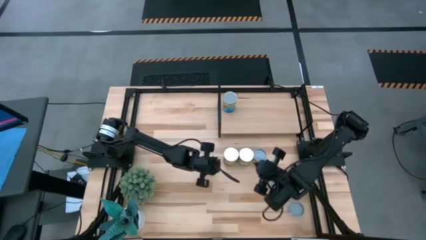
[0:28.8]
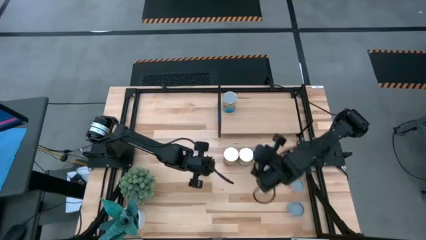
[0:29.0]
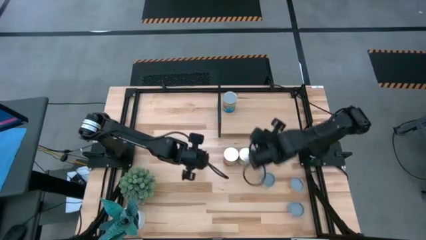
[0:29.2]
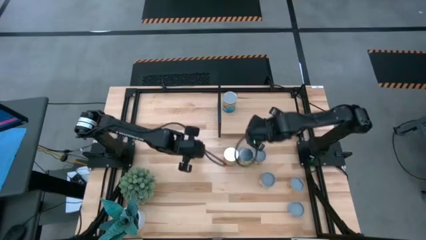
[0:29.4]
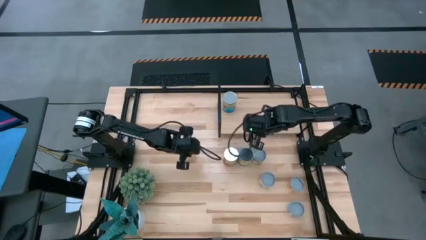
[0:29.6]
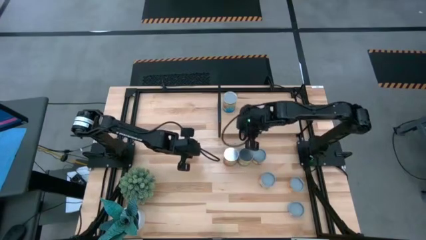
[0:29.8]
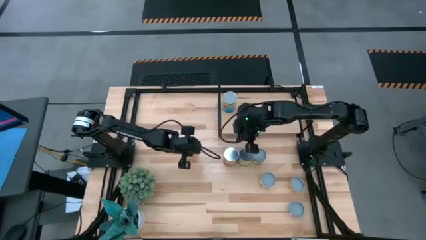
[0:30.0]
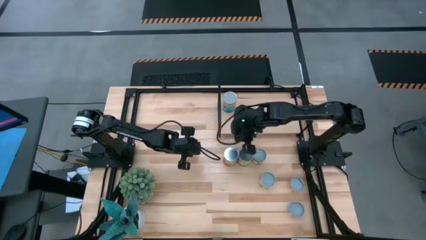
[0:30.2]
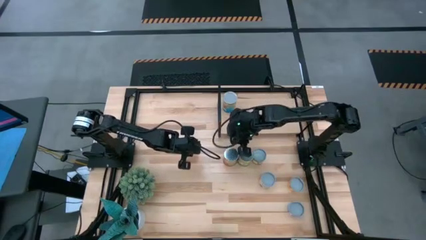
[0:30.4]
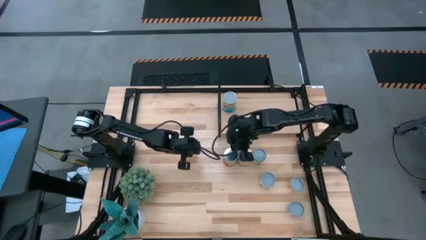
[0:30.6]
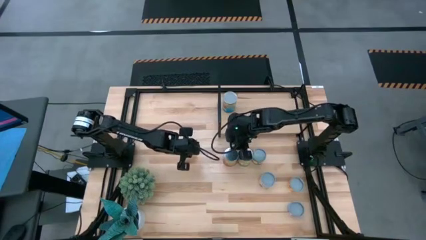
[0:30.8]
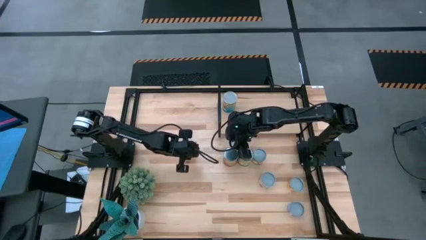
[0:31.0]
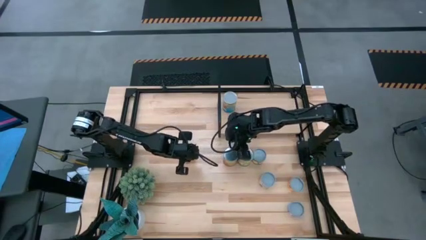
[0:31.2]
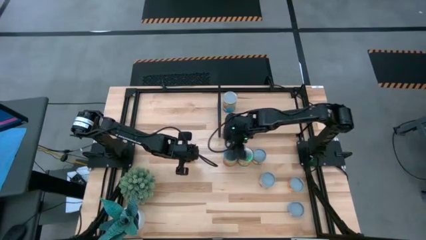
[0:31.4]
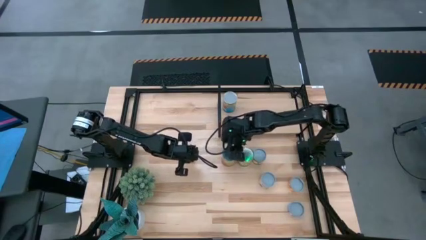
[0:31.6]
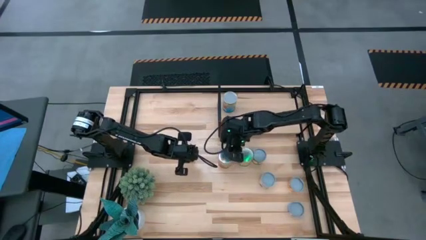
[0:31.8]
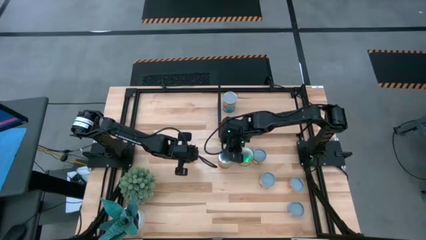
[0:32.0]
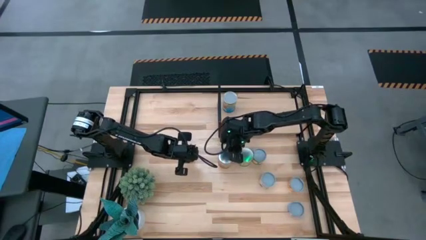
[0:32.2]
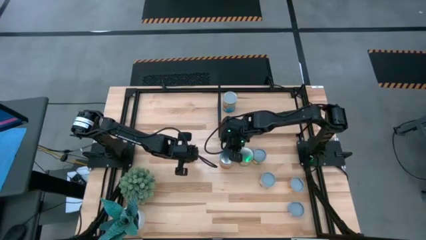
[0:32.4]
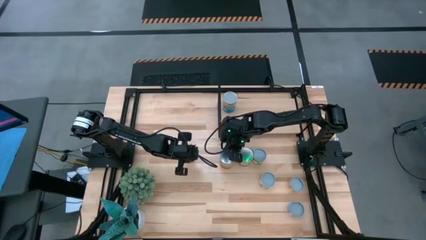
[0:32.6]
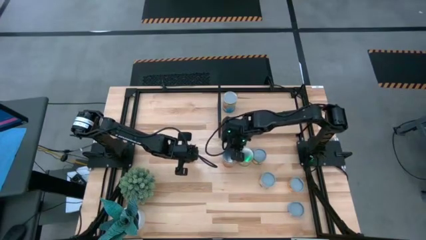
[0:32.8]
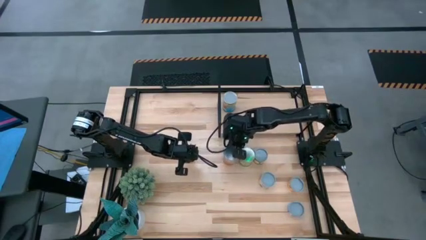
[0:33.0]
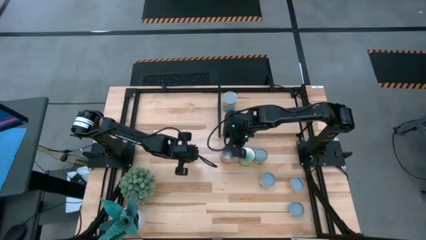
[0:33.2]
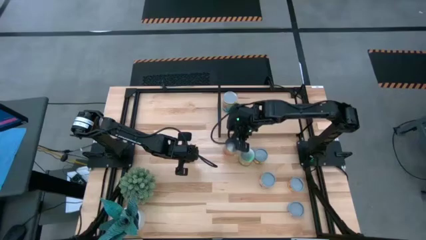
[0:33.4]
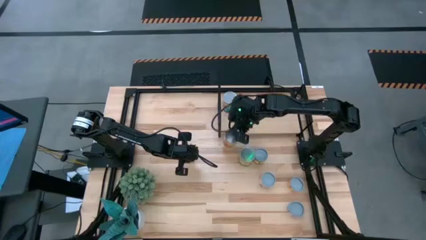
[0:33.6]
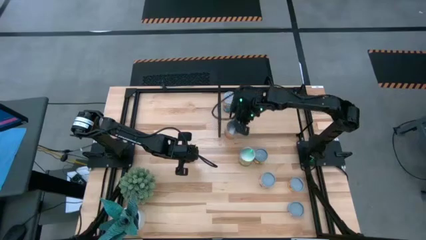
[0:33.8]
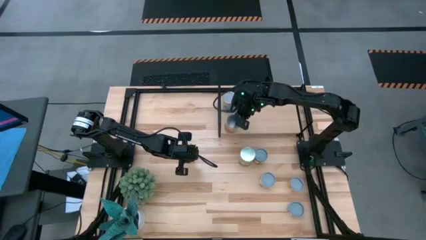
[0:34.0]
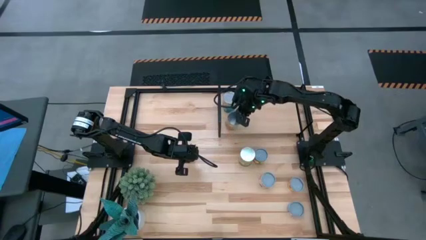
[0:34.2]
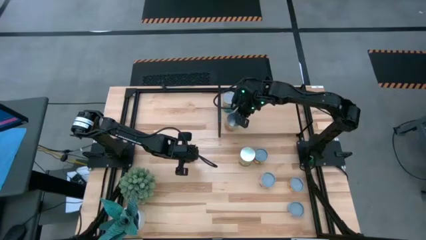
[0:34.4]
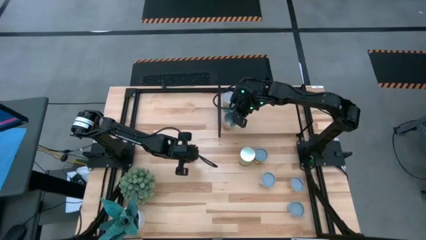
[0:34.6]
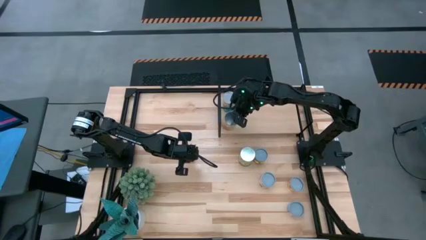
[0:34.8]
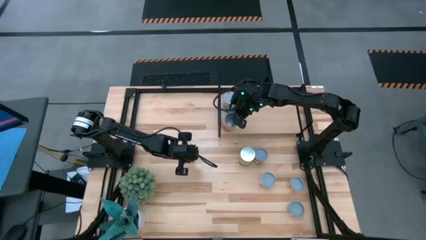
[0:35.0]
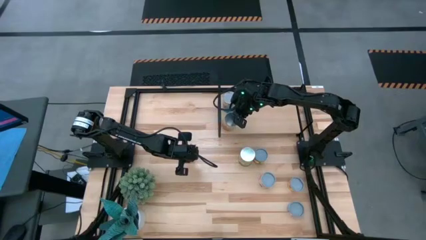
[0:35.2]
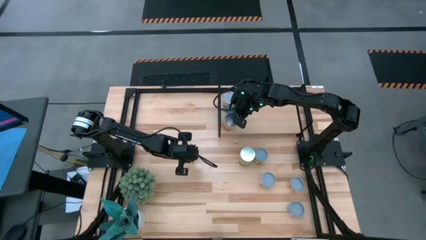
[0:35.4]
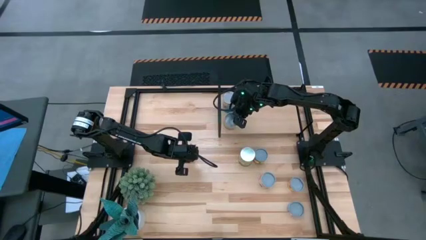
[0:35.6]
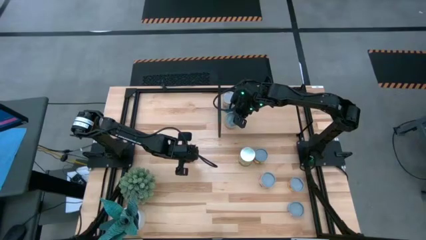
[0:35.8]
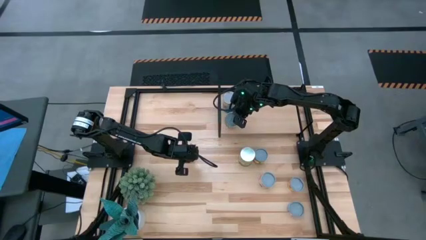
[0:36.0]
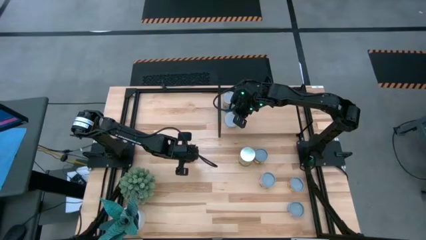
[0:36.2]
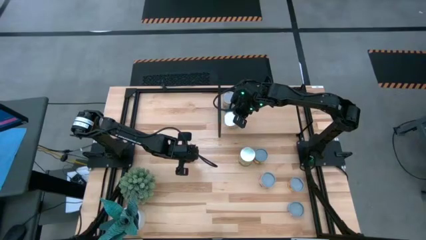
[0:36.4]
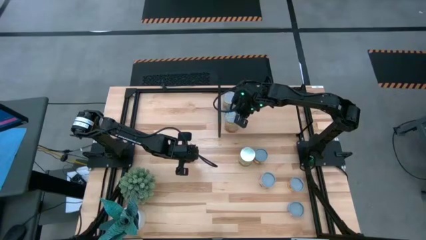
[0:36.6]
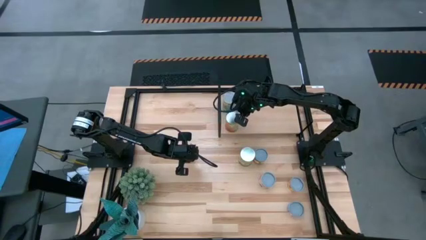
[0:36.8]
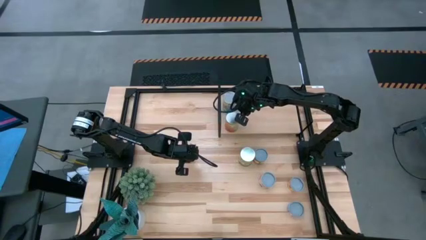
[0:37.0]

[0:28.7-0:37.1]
Task: Pick and place cans onto a shelf
Put the canned green beans on the shelf

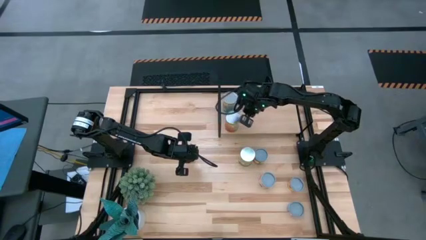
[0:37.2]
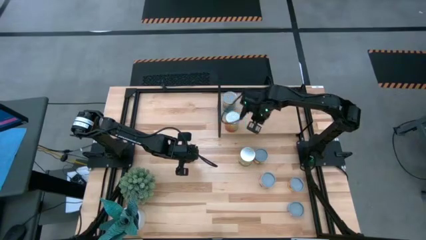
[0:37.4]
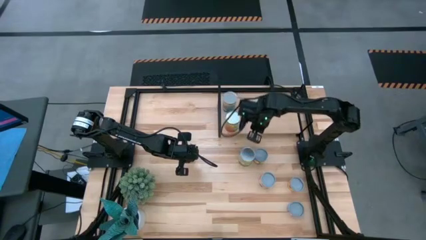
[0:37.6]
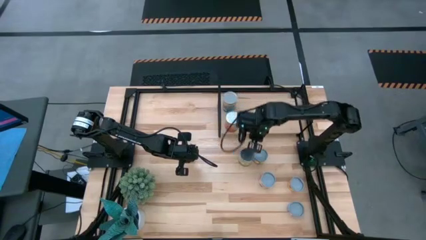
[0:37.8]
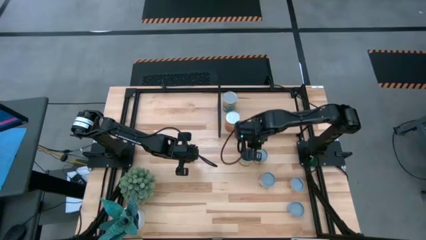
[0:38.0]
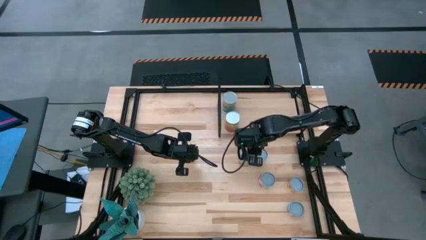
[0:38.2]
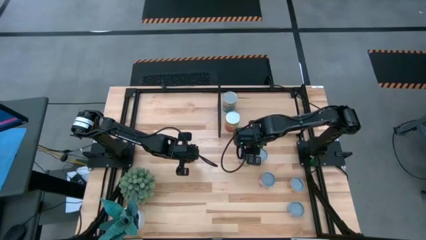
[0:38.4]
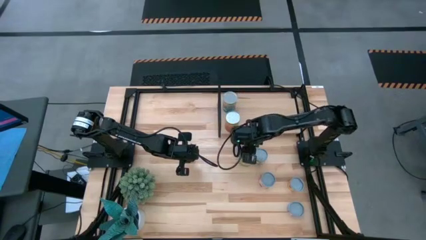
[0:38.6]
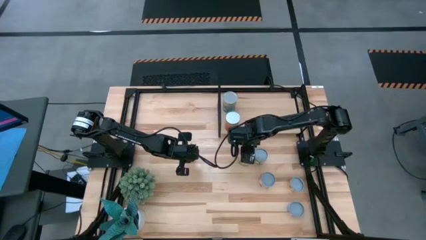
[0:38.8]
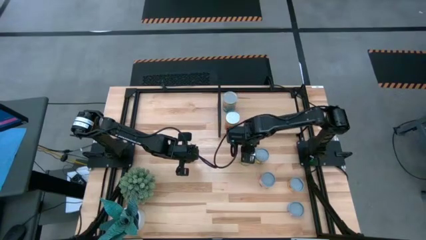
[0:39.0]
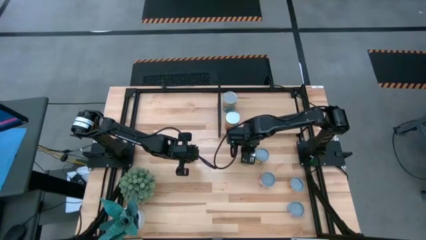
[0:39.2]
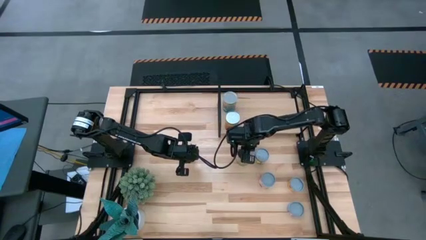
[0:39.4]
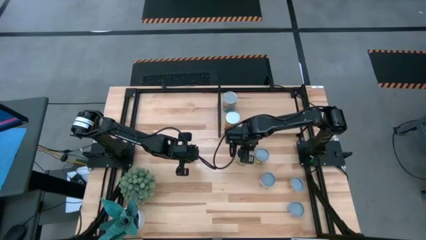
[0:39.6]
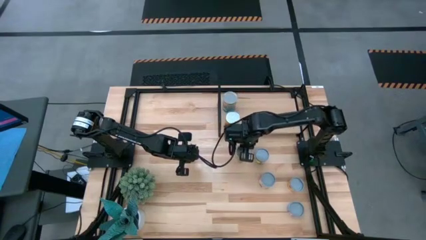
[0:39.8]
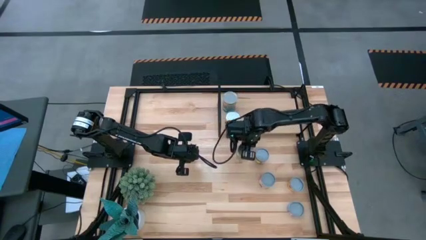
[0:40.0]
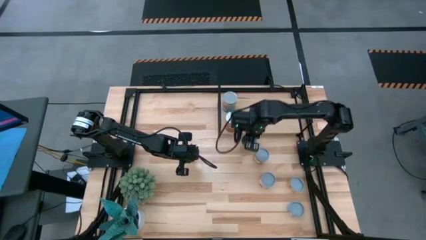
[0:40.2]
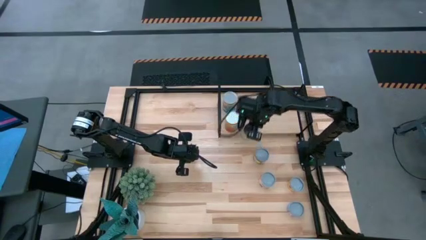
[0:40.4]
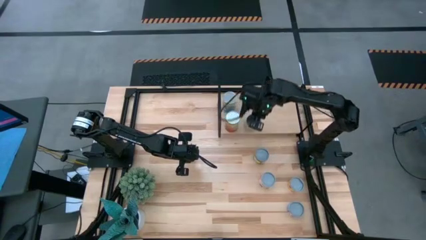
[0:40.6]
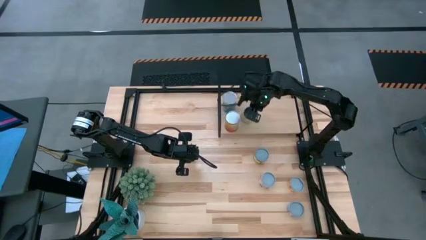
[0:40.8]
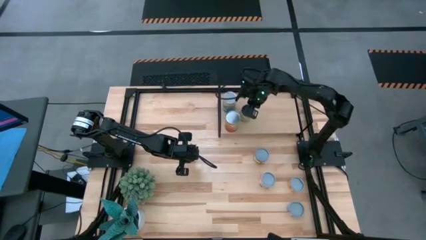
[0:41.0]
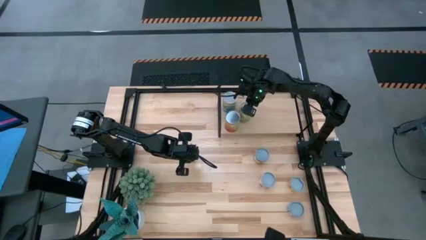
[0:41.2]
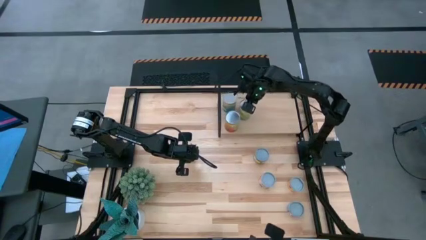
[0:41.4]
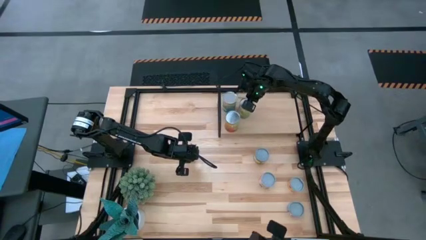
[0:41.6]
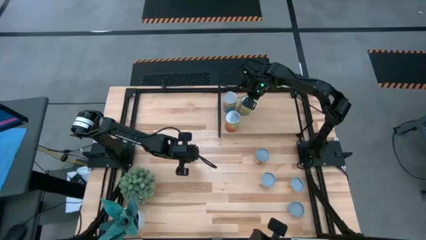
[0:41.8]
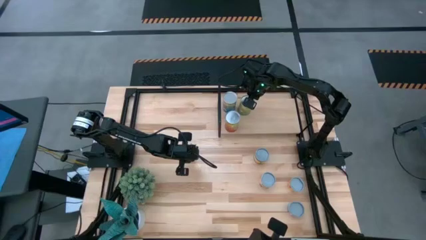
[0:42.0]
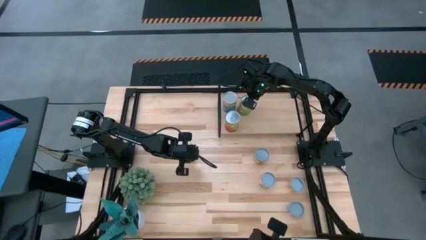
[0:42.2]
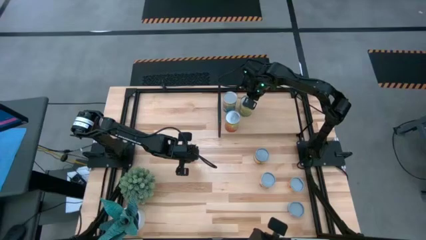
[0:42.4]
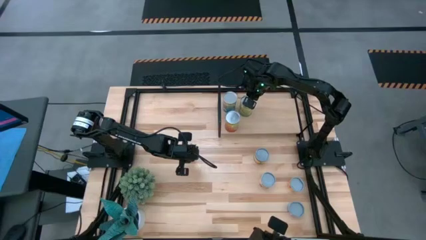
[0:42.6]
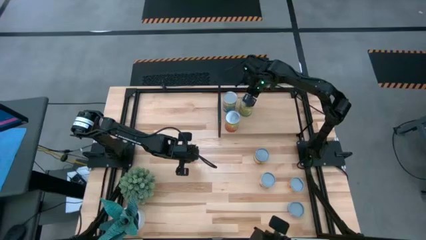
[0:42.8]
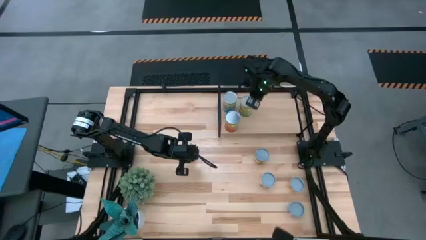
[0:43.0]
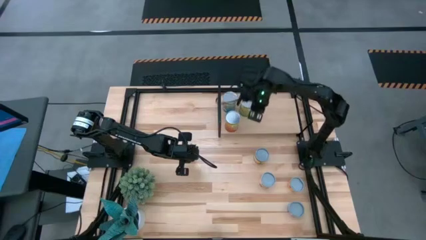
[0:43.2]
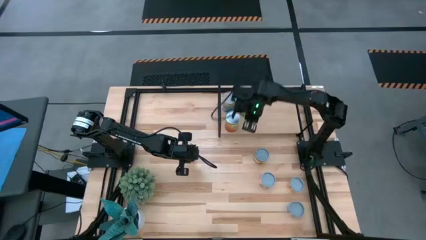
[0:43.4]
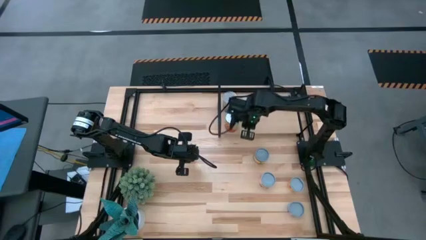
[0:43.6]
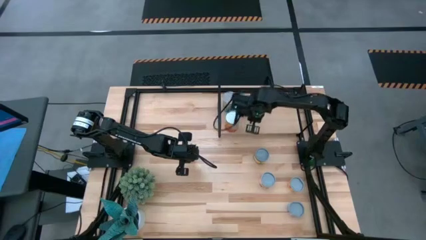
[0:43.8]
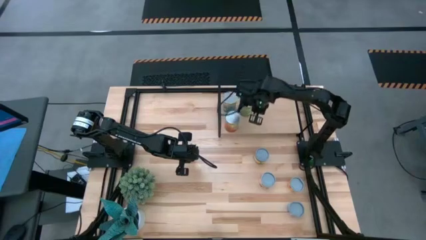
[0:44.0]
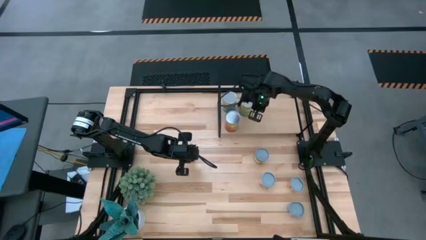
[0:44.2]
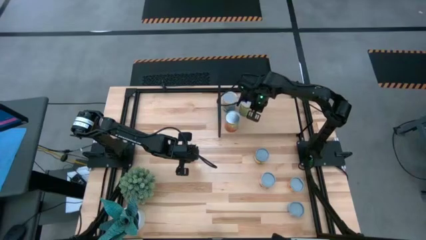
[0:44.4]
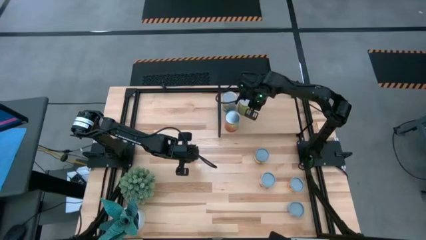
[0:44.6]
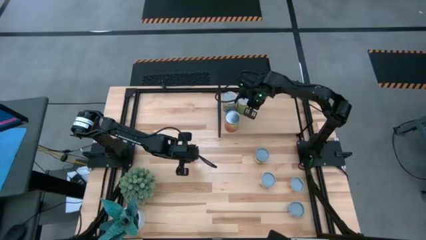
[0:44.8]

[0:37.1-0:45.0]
Put the canned pears on the shelf

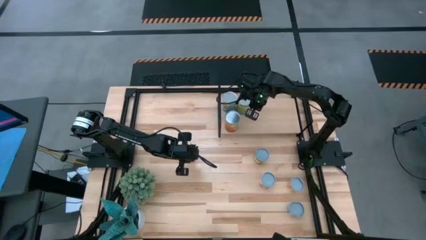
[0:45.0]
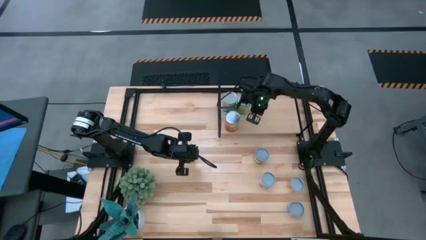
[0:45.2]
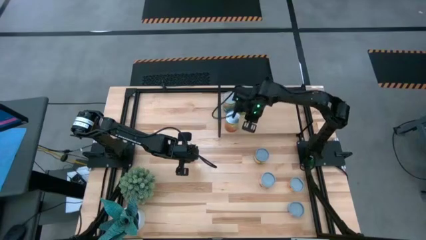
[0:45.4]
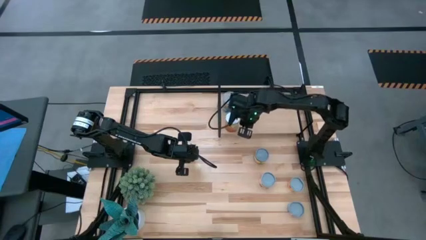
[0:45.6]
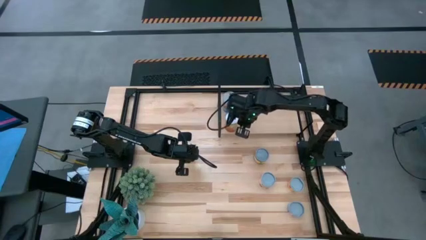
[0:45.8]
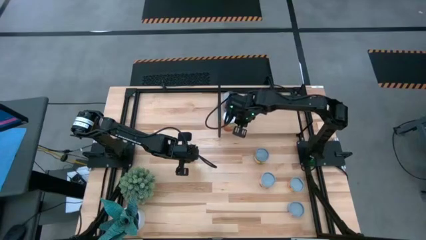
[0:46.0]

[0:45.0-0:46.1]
Adjust the canned beans on the shelf
